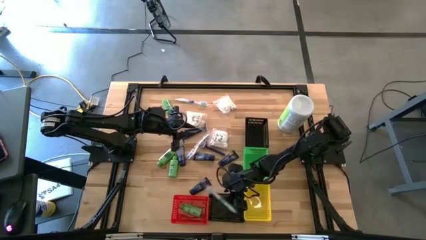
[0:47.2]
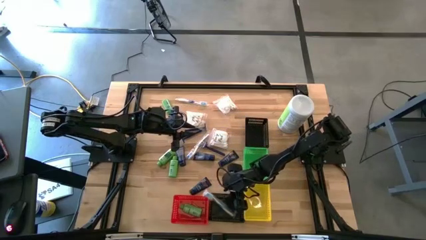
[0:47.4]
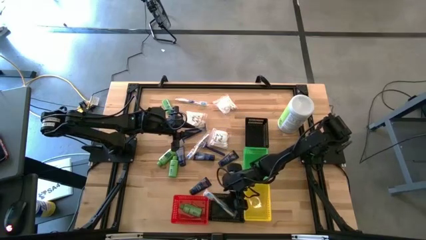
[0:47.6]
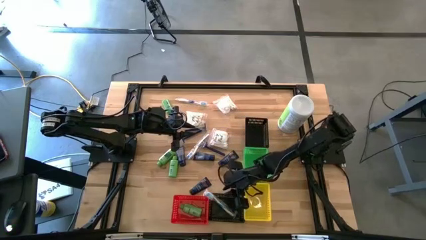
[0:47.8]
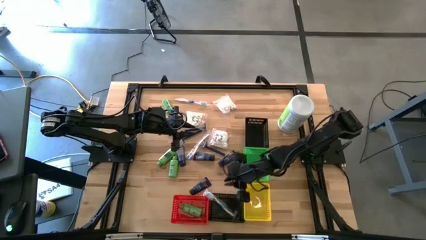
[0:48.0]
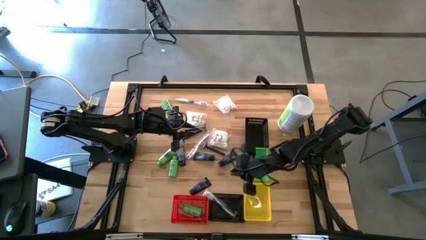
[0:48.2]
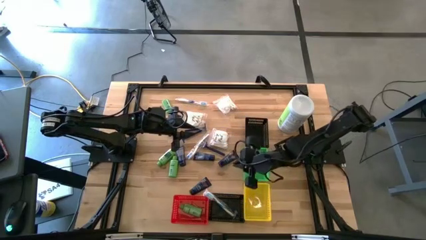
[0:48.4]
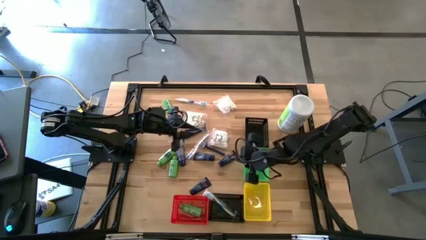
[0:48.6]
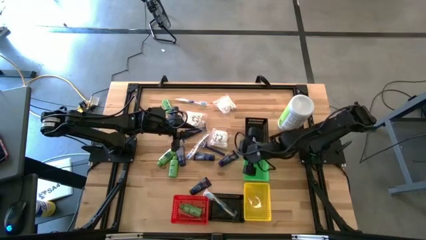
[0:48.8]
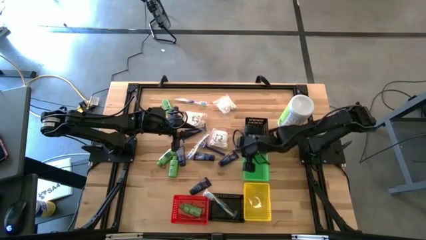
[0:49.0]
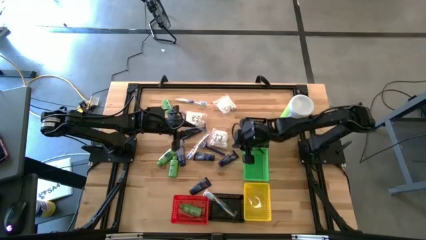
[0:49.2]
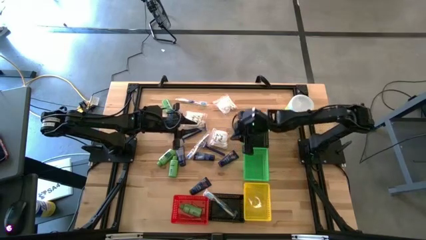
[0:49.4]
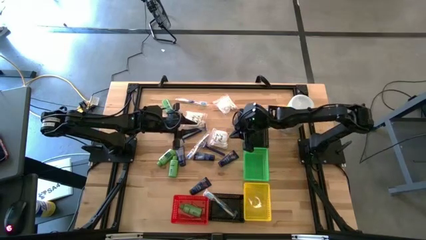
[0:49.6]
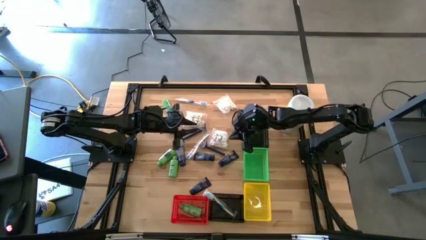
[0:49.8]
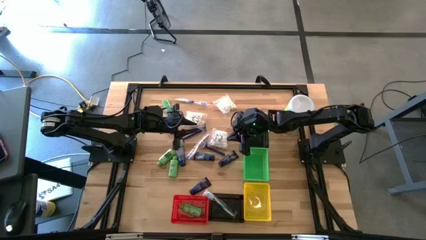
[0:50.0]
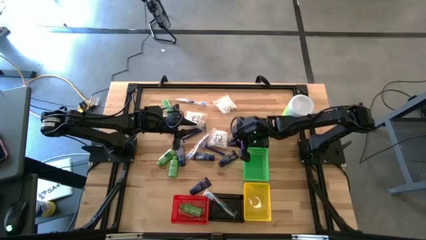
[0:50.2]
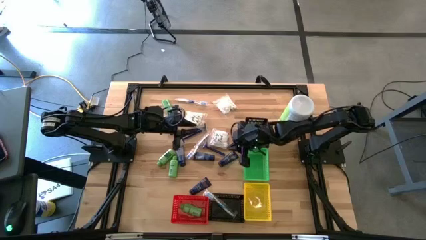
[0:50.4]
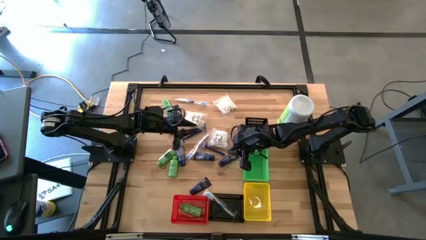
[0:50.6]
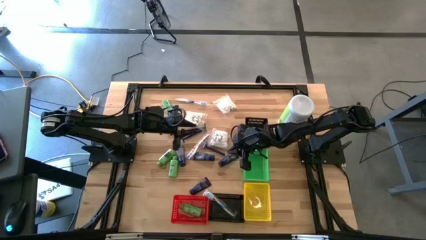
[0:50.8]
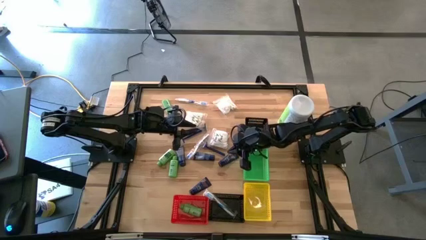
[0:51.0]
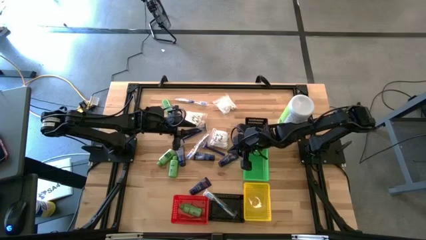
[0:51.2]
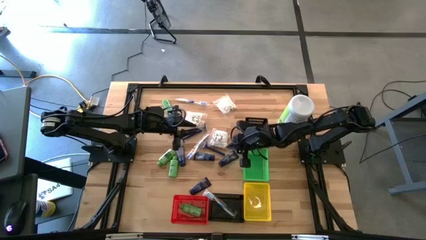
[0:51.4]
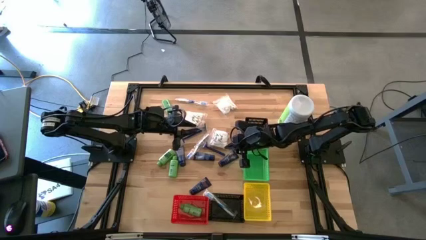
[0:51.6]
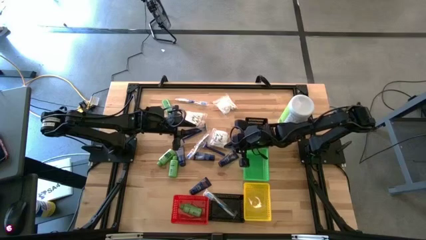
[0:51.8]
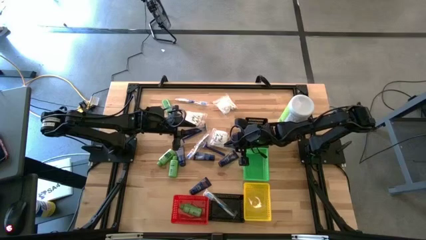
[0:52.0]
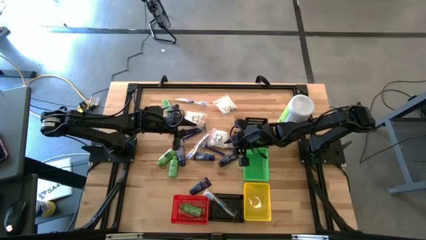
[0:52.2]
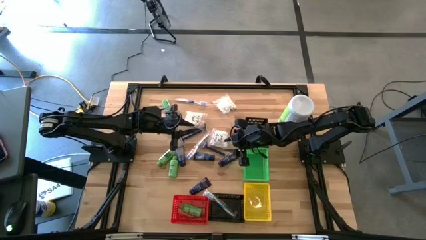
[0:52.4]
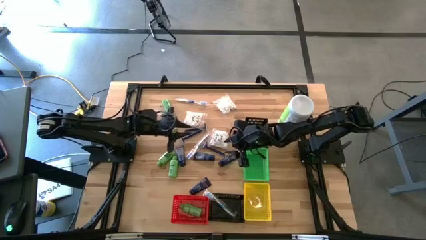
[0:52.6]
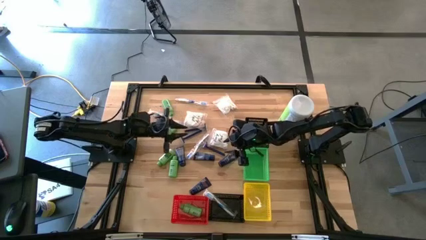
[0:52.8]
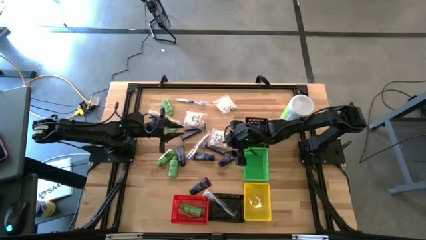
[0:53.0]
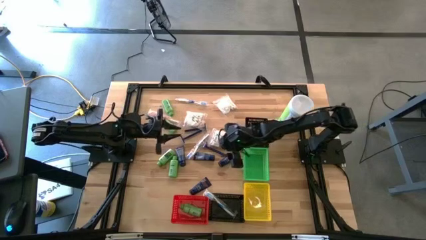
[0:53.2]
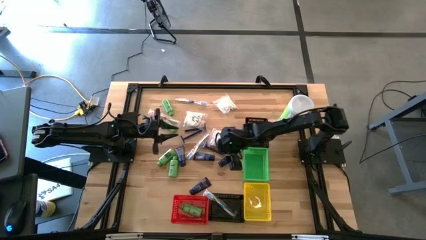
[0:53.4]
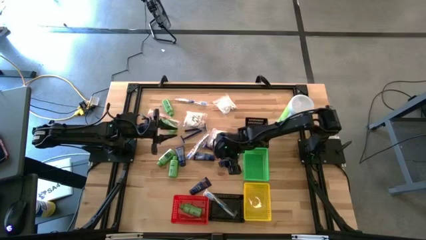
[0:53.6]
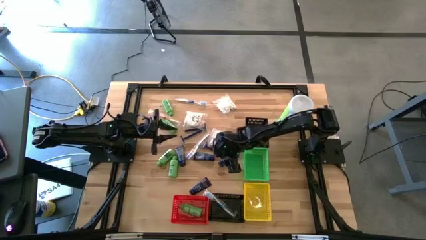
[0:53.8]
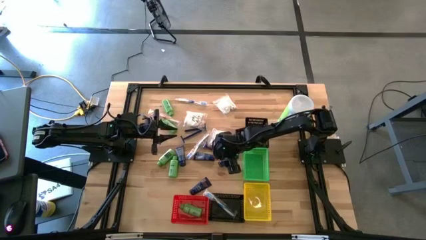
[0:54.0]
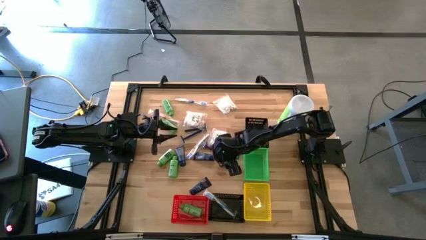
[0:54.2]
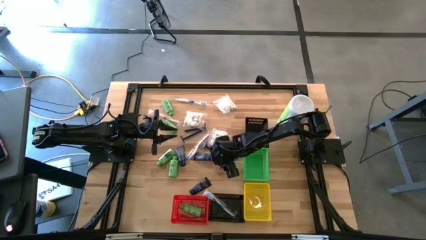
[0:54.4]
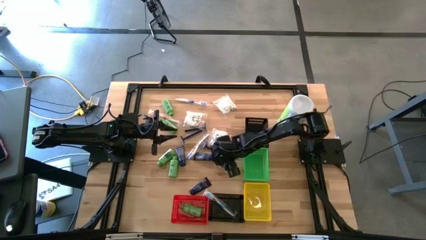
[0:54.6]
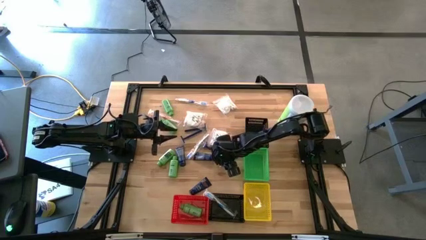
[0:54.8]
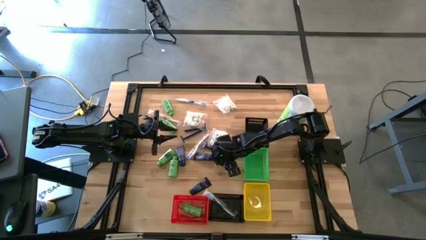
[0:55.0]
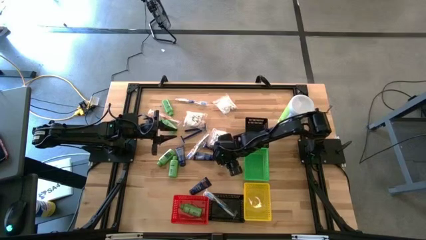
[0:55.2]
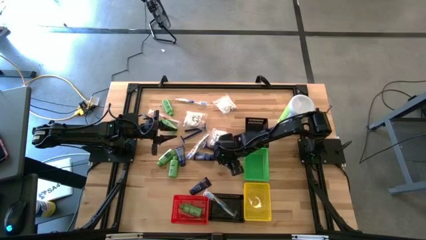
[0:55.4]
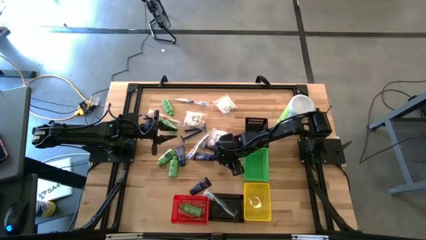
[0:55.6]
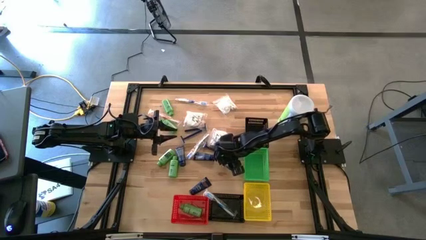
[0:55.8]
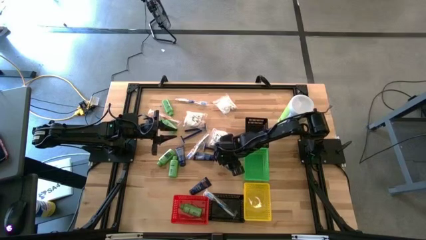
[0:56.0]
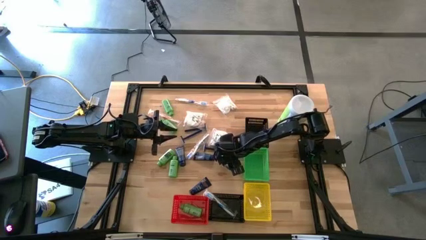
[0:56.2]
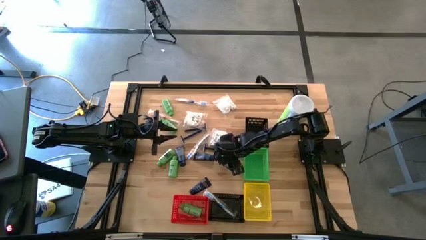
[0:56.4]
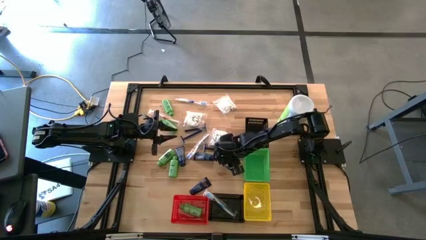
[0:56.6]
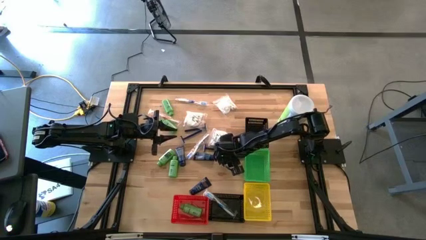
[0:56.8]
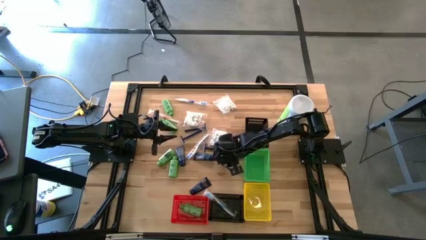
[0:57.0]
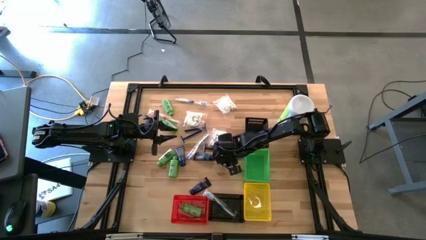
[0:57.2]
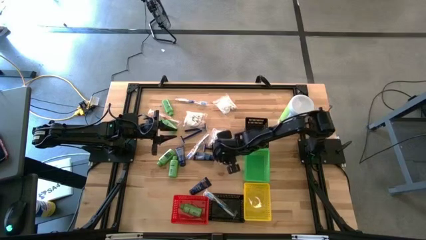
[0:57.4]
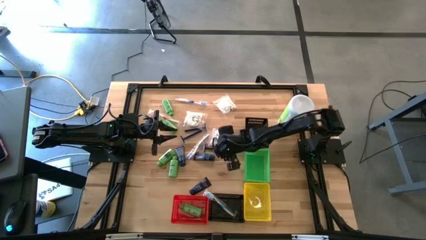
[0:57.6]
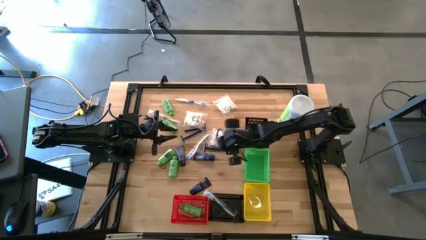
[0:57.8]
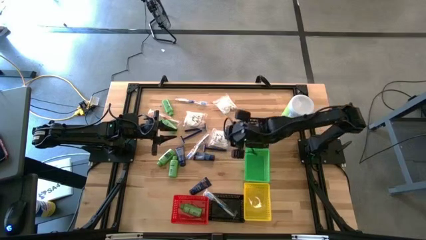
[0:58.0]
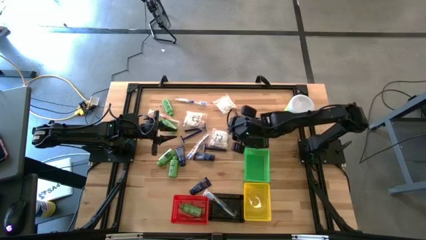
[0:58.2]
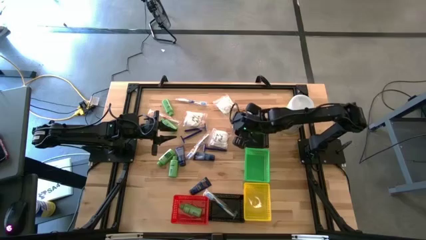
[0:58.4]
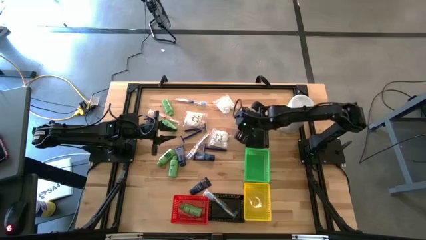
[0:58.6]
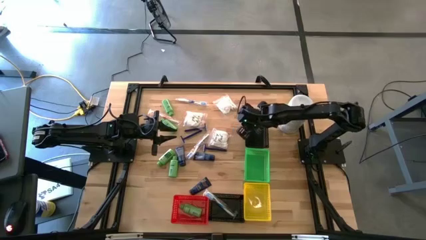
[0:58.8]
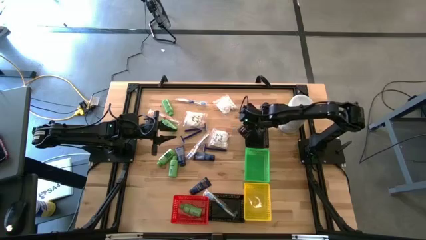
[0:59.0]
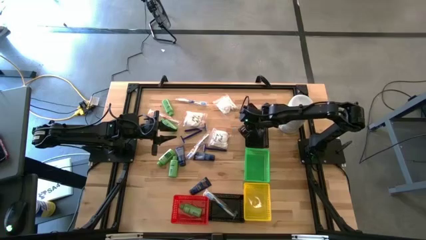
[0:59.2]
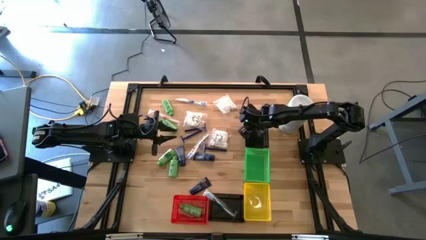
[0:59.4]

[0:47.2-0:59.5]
Task: Pick & Place Travel size toiletries
Put the blue shaving cream into the top black bin
